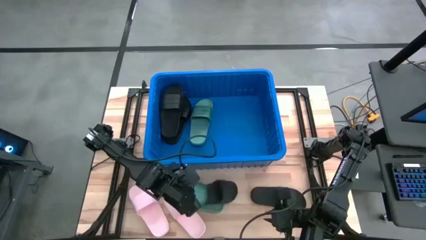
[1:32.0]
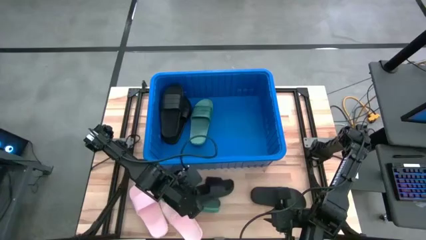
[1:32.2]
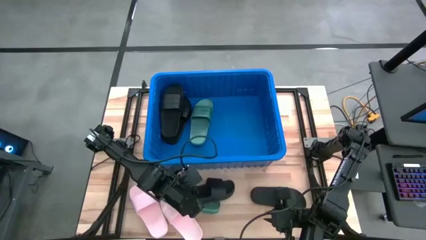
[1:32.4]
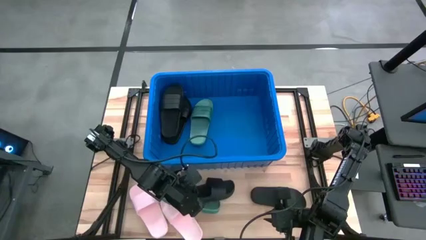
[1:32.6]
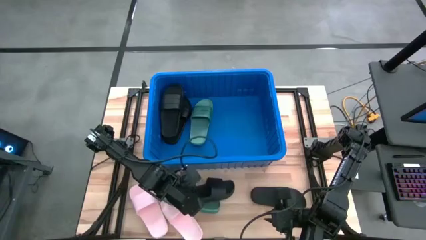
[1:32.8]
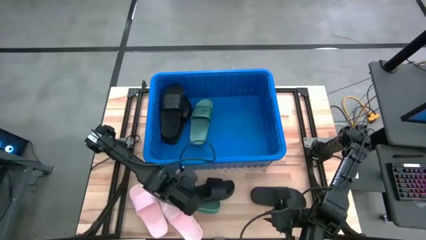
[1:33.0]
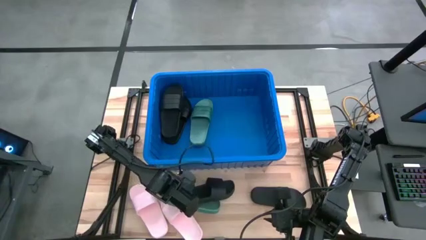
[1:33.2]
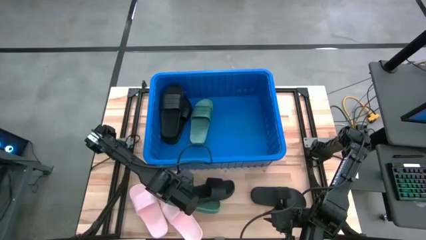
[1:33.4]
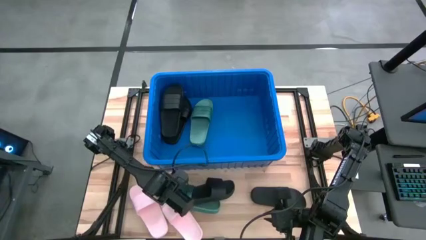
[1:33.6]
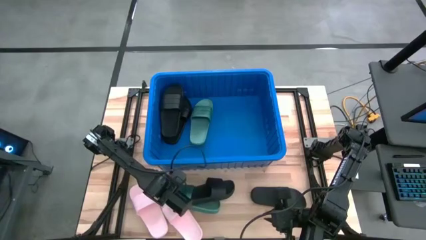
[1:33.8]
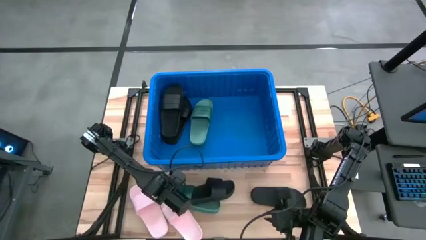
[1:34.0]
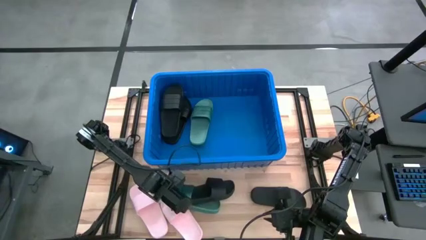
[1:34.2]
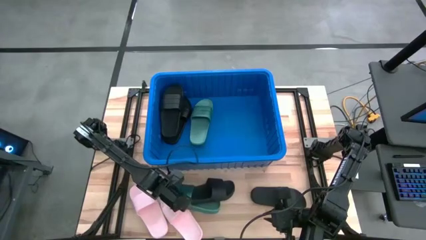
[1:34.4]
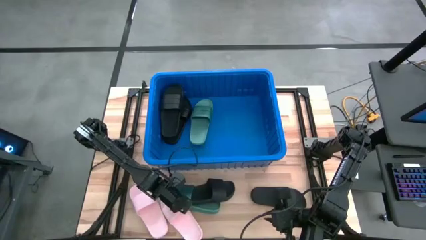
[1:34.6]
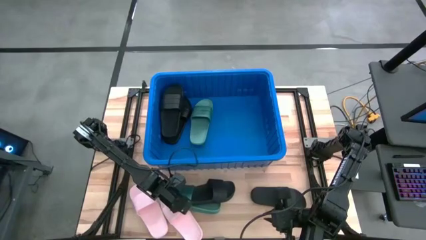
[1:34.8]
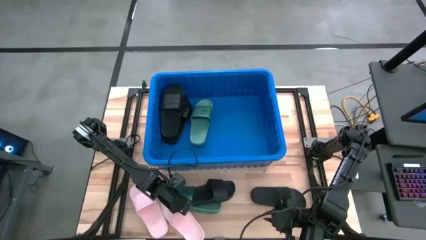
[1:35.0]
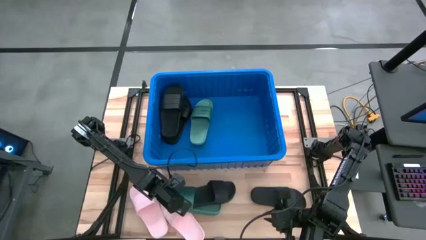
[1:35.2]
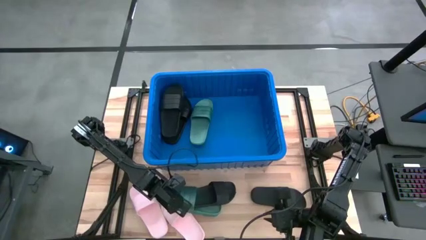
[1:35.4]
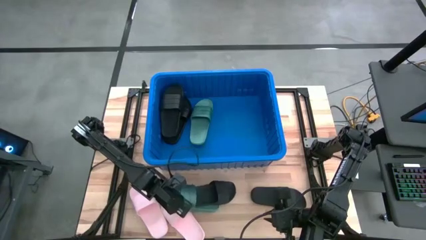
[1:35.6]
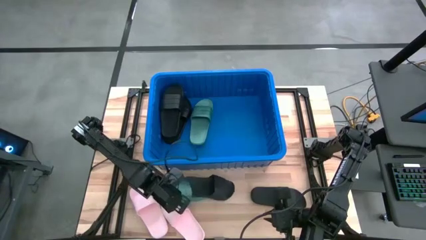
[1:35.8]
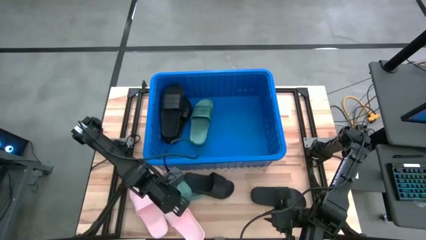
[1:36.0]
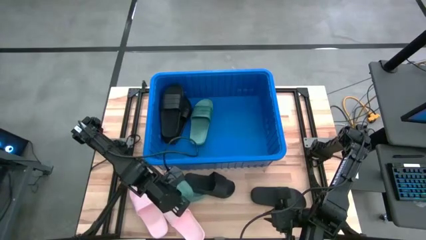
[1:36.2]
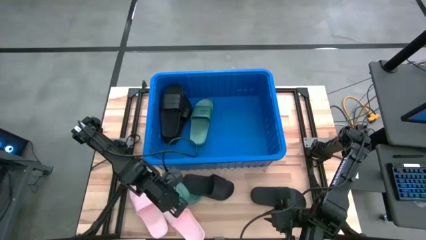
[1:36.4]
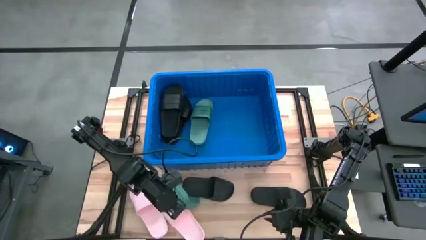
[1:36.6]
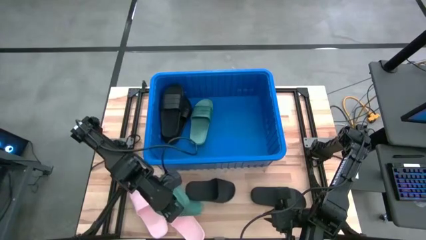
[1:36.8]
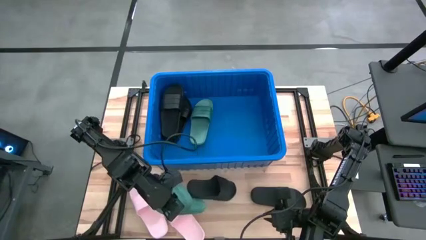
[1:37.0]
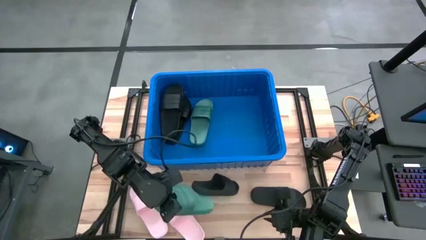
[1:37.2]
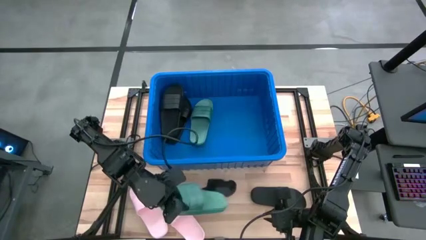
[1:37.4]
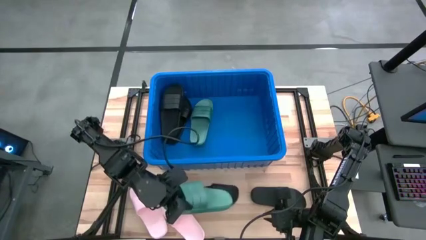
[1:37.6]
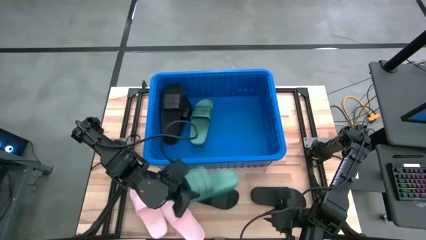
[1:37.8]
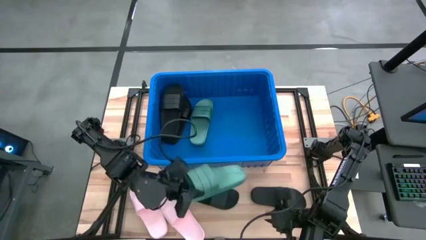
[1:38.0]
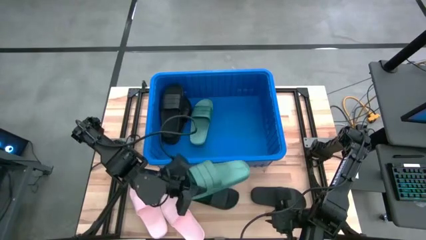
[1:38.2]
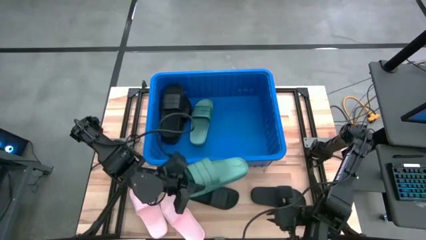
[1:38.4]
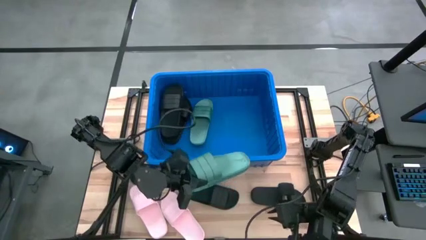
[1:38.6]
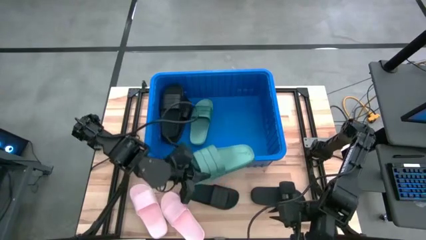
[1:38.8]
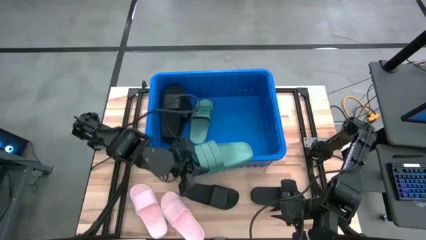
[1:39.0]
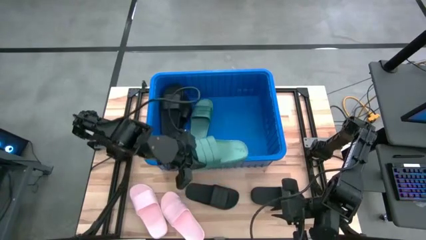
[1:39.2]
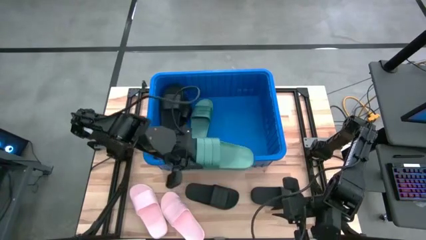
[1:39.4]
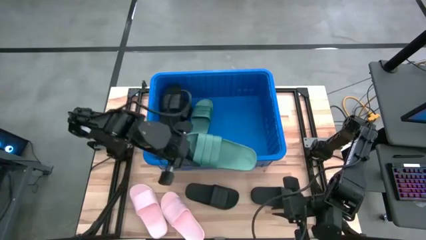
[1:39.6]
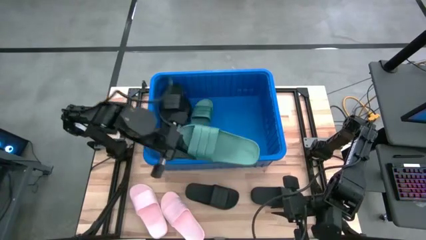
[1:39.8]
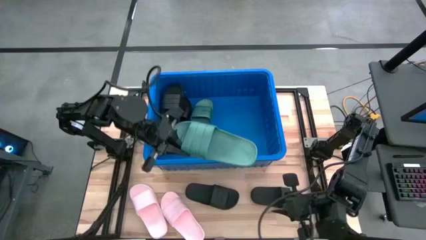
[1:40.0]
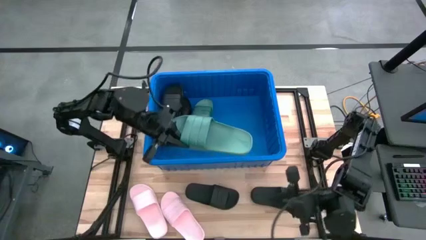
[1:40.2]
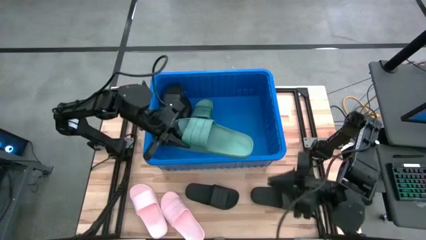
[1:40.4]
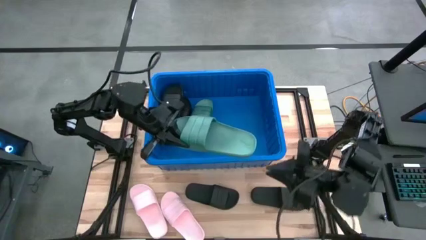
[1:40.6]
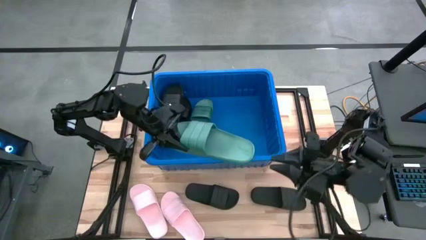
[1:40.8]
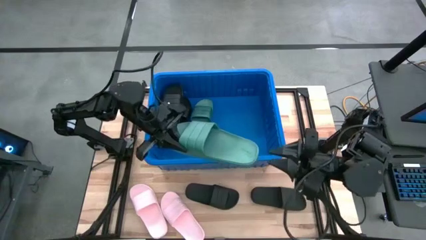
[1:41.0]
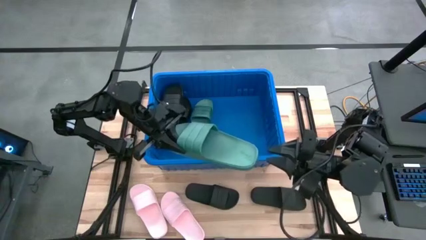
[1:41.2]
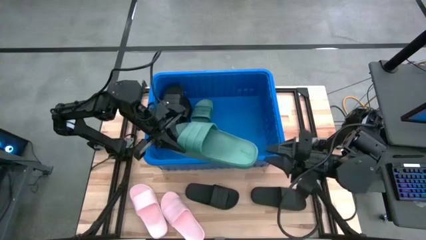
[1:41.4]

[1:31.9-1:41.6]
Task: Pick and place slides into bin
Put the green slipper into the blue bin

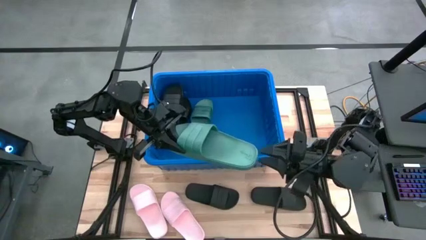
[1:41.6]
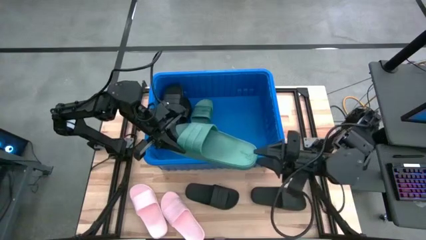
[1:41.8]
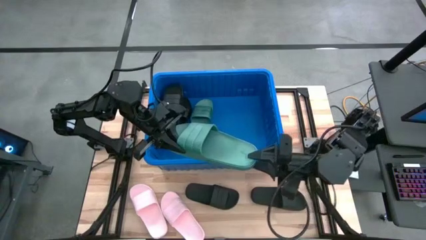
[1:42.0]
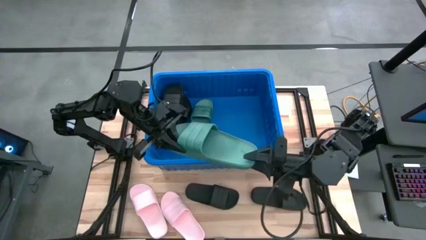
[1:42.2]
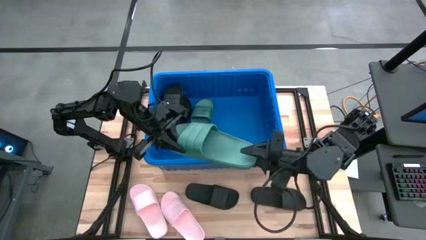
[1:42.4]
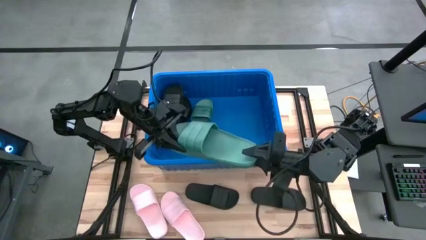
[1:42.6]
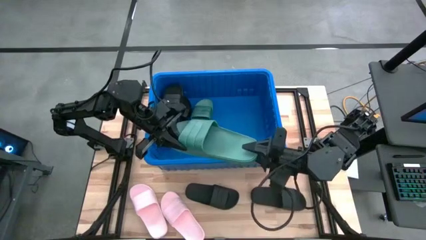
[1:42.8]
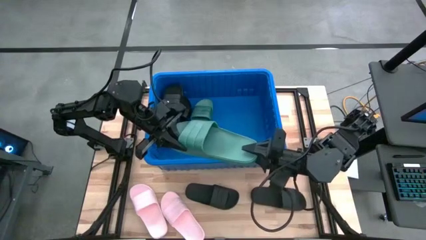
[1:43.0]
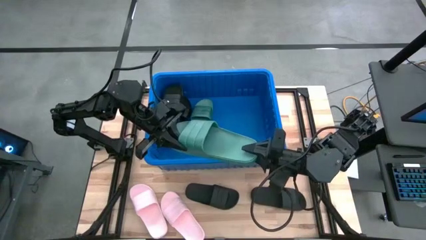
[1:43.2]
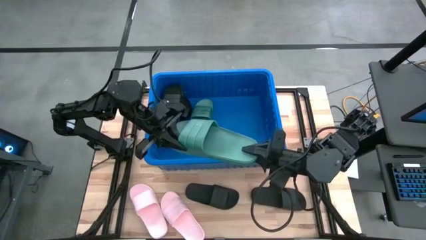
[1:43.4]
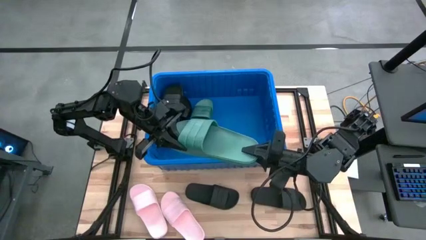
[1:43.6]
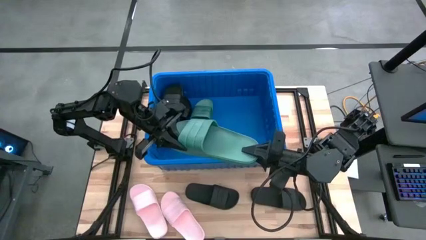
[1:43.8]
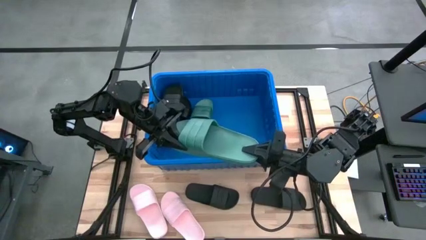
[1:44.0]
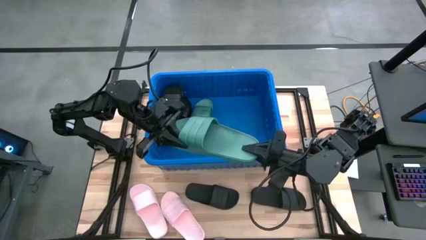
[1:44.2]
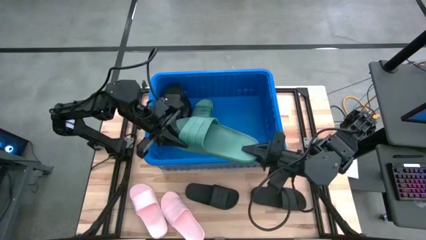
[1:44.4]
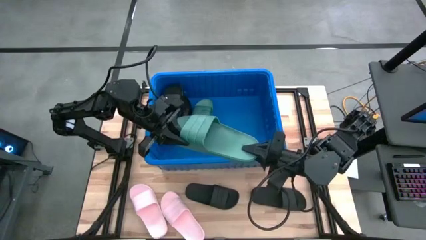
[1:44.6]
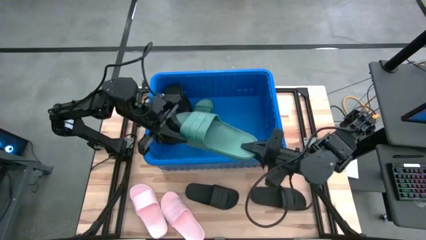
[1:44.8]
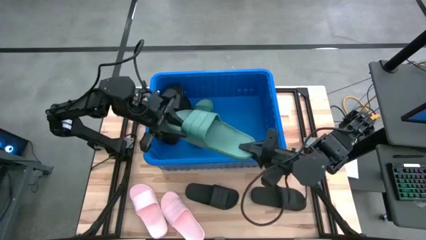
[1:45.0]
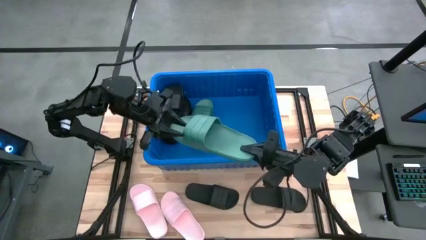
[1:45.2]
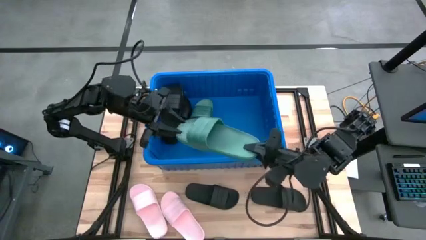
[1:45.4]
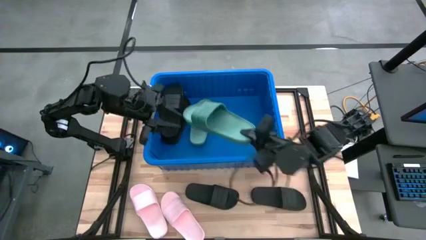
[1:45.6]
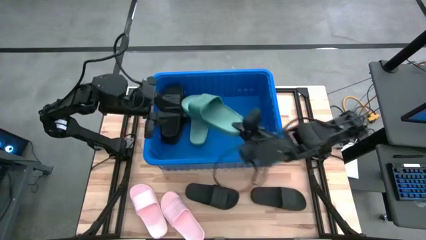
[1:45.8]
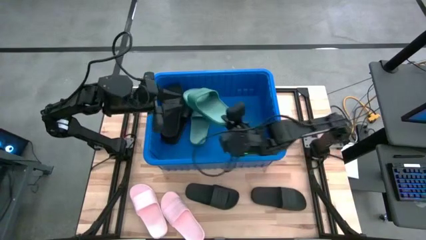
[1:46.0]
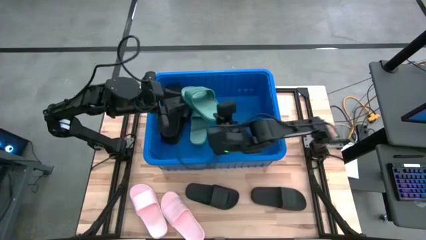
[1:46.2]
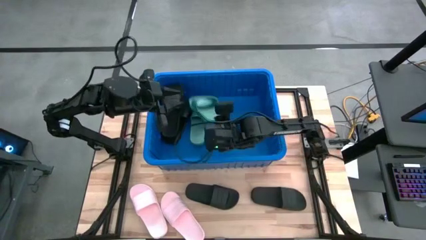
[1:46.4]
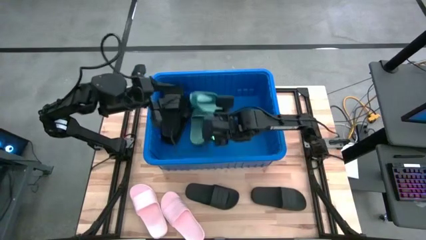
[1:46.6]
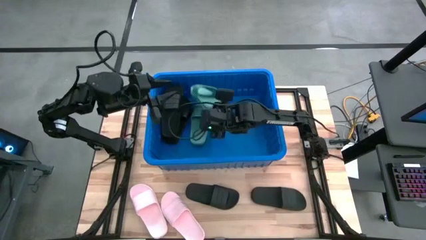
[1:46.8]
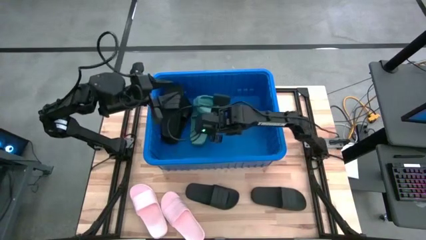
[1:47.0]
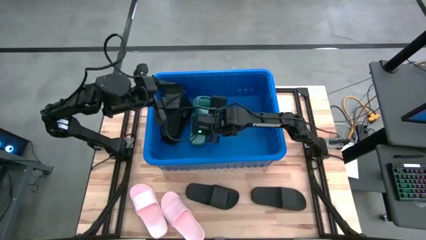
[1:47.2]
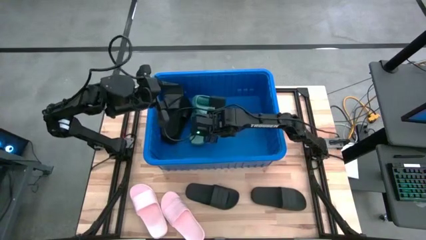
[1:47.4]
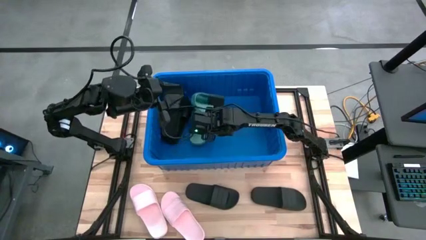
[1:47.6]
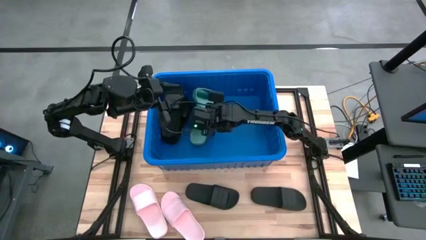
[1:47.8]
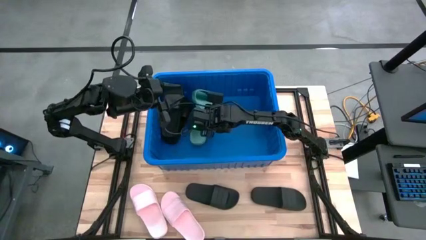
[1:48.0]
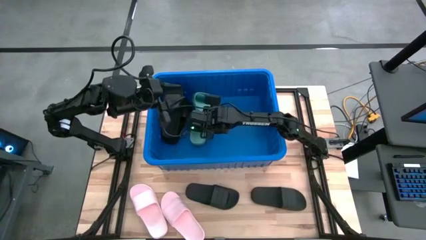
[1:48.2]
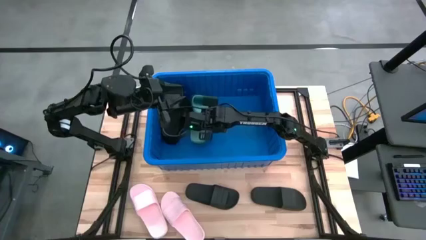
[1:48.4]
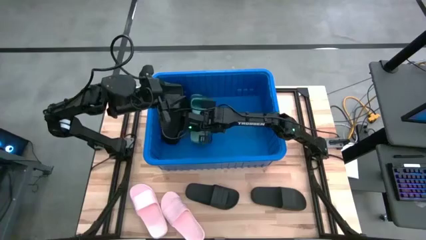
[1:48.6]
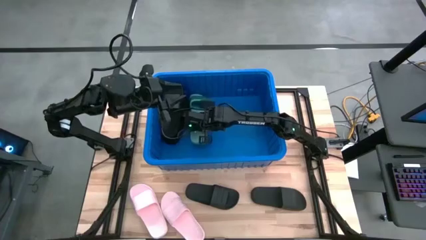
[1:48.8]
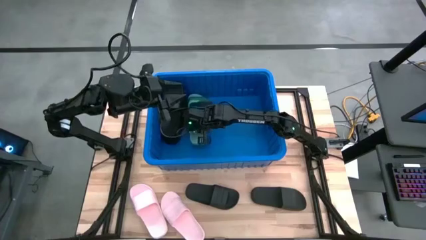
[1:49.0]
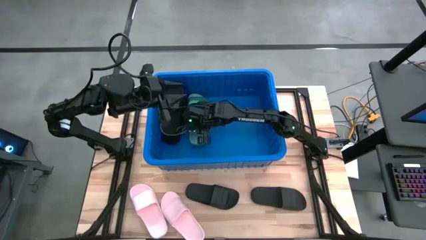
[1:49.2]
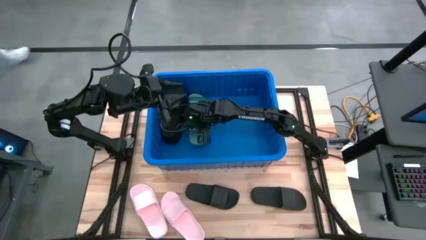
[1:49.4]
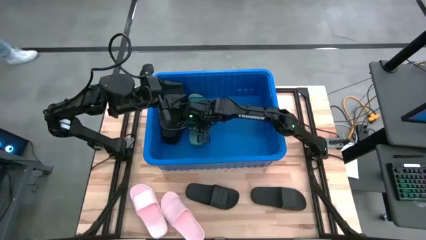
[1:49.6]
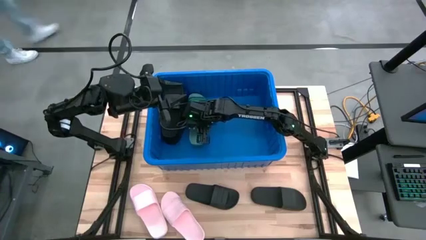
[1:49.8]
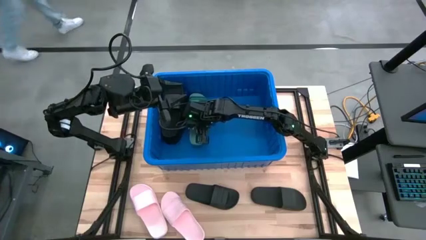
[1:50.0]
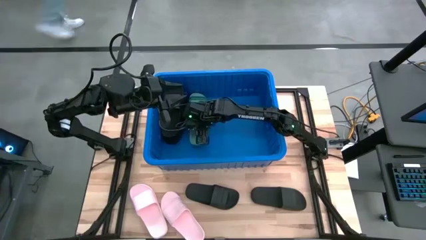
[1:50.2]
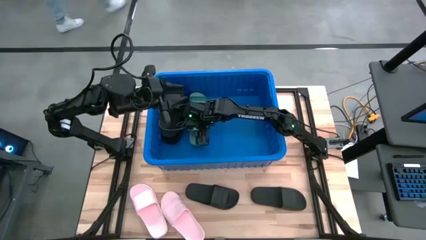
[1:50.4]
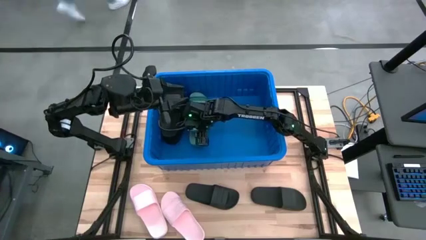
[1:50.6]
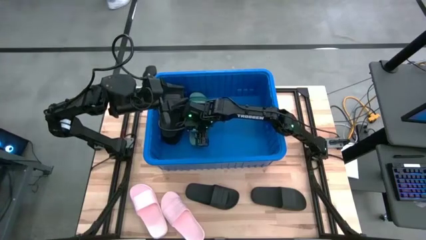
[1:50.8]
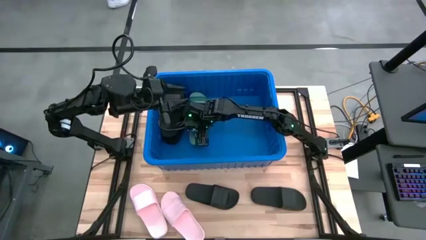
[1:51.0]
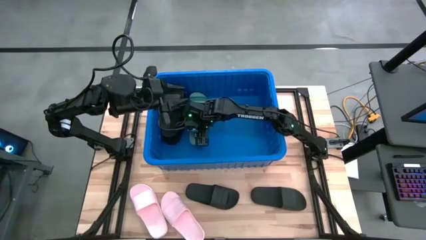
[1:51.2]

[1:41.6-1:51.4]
Put the green slipper into the blue bin
